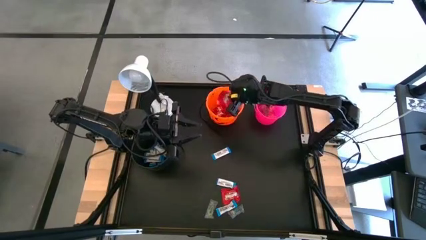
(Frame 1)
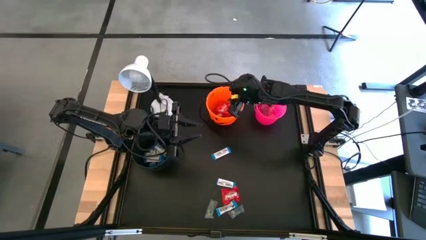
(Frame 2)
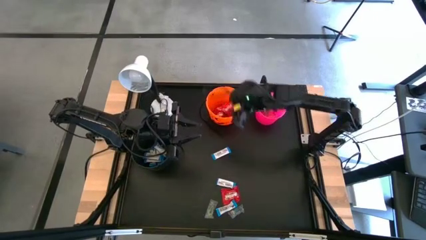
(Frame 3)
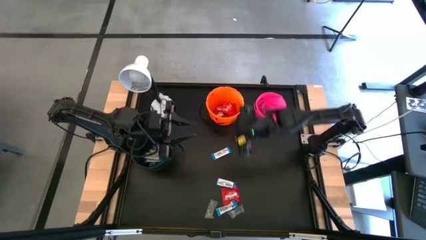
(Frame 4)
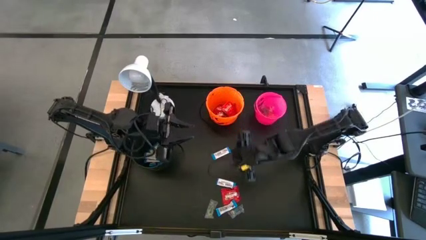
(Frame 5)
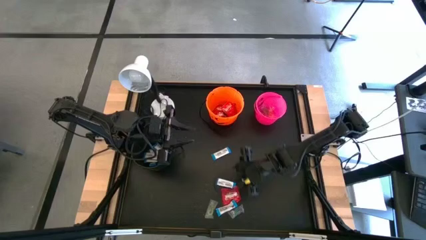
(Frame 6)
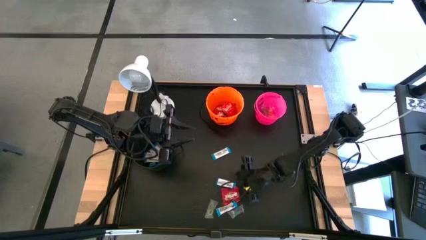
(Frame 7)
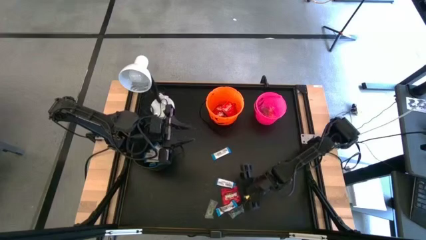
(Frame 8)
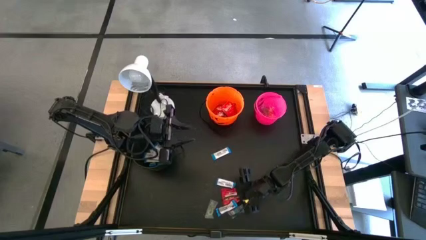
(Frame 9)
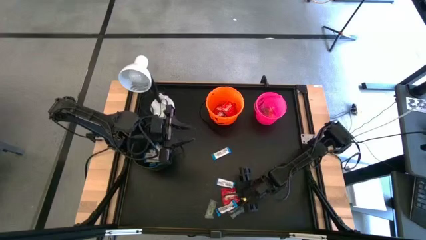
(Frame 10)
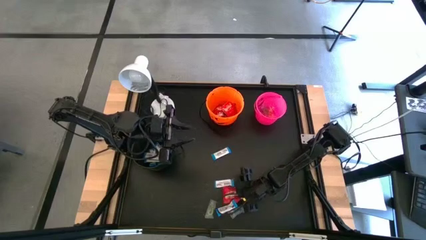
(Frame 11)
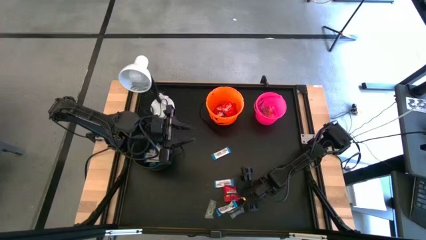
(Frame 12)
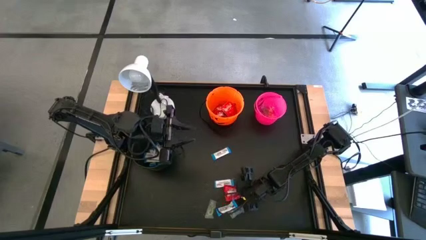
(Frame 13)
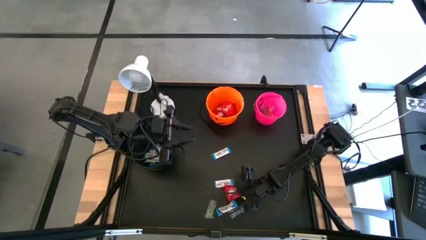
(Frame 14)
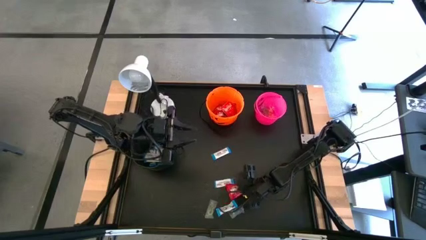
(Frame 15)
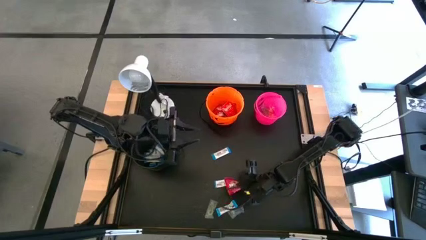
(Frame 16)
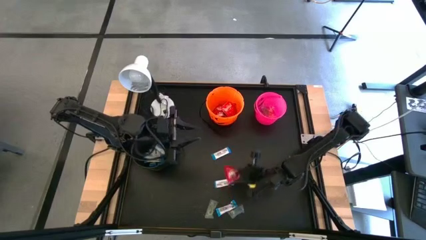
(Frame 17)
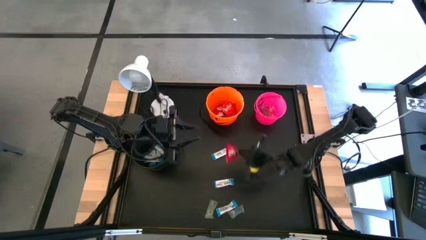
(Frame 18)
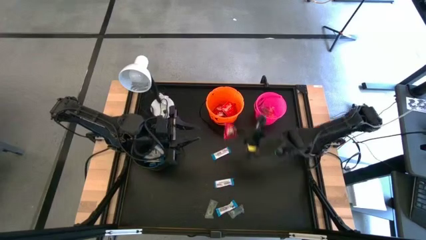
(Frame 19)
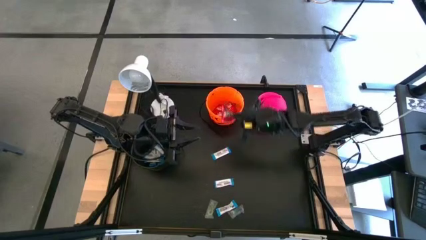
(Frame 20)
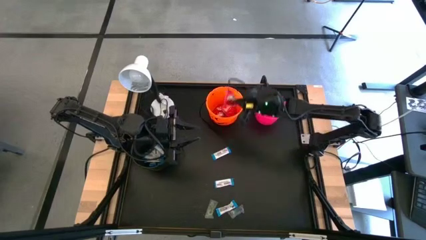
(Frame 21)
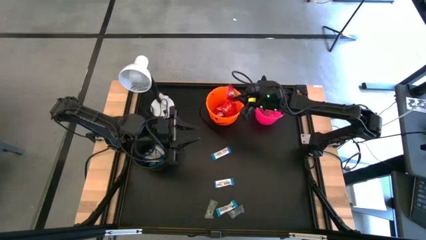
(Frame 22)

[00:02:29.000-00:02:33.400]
Task: Sort candy
Put the red candy into the orange bucket

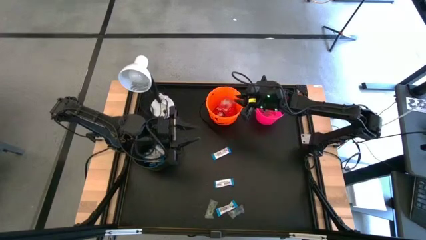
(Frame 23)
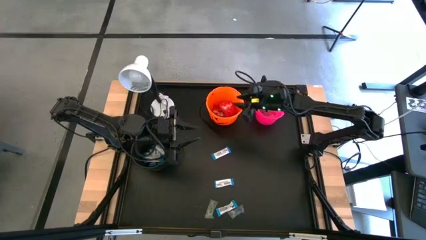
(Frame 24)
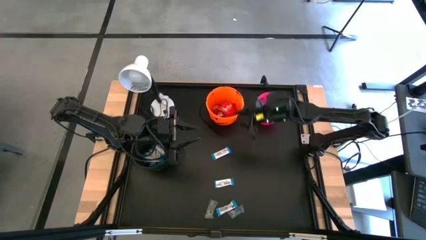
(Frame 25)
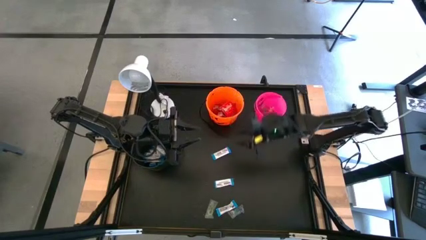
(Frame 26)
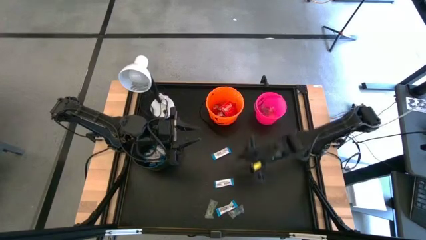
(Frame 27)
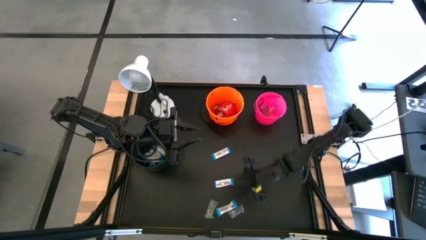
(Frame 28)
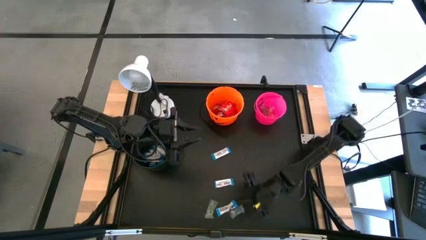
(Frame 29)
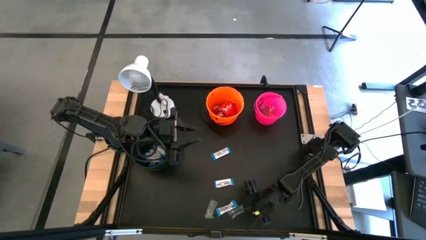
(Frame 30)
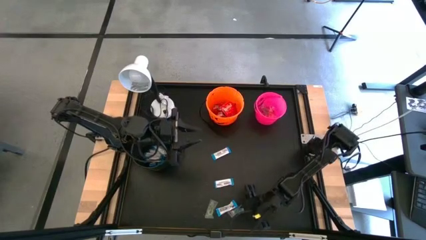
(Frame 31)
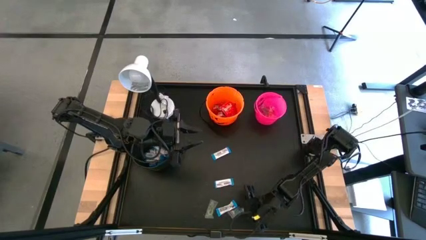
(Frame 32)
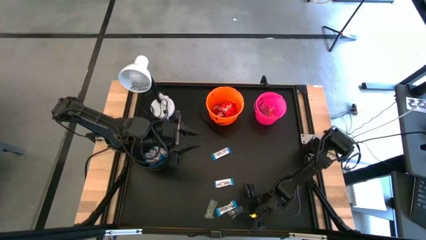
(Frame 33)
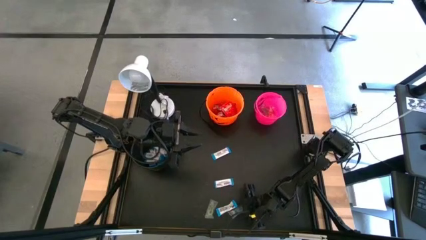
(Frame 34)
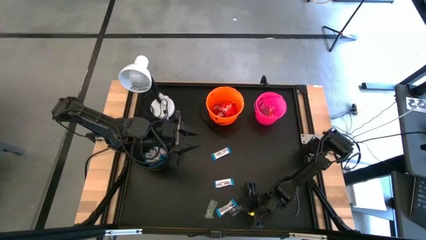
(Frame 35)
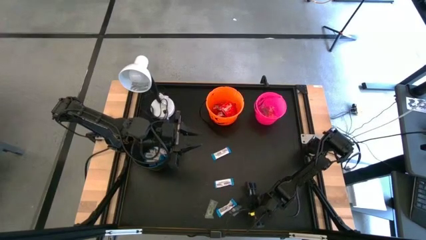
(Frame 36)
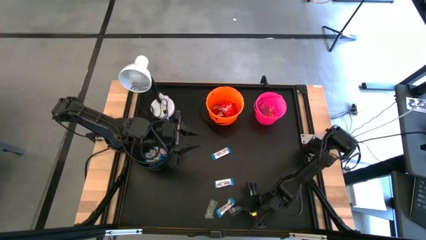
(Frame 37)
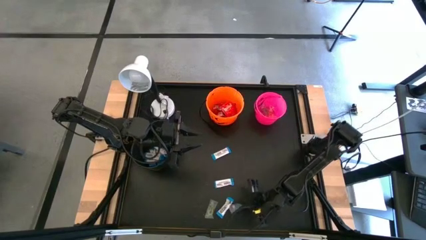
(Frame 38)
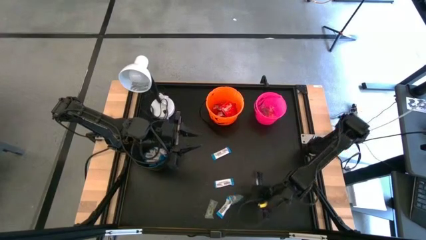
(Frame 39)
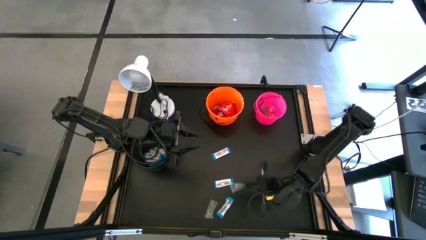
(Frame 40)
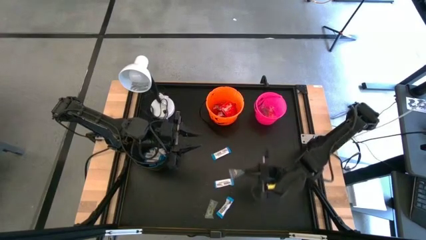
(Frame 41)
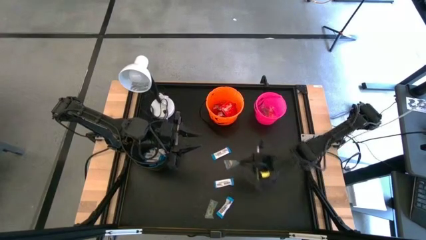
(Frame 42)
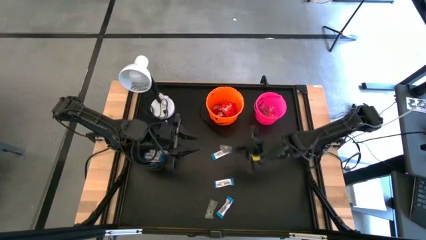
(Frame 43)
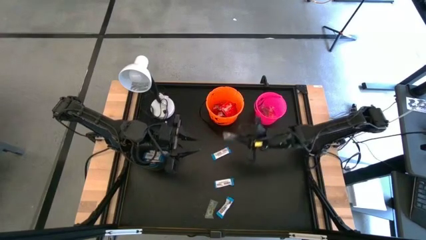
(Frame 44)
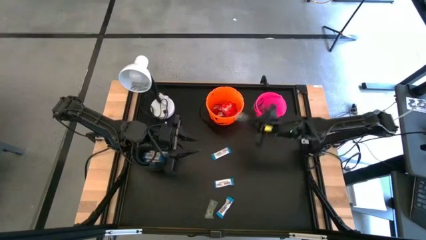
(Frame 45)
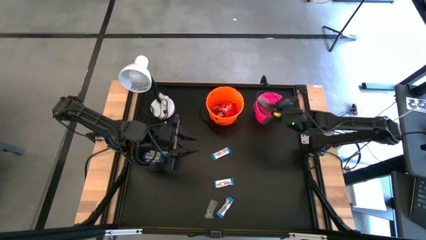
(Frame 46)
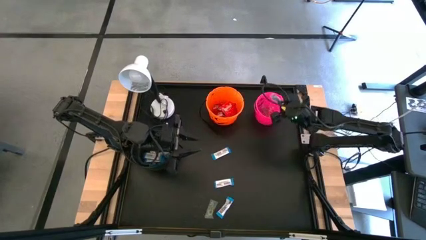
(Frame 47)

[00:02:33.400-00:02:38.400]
Put the blue candy into the pink bucket

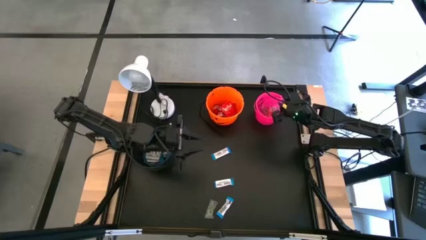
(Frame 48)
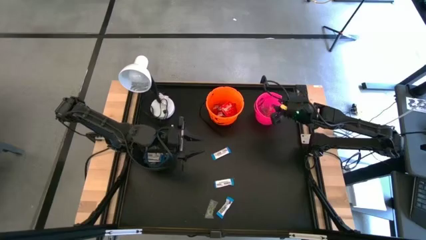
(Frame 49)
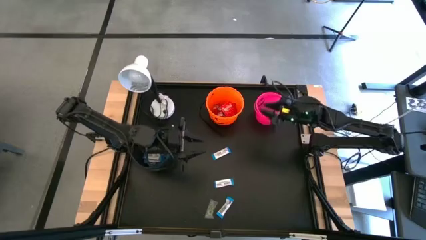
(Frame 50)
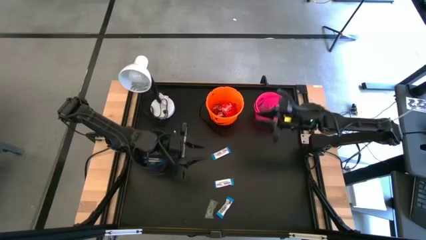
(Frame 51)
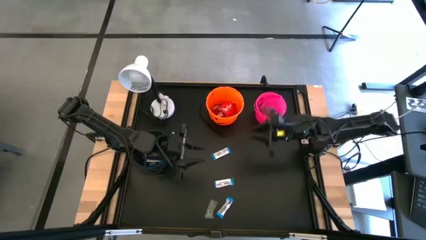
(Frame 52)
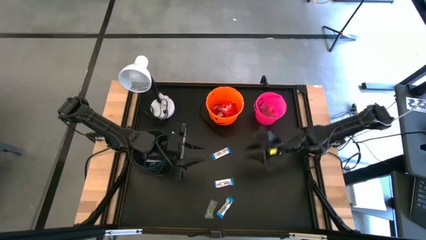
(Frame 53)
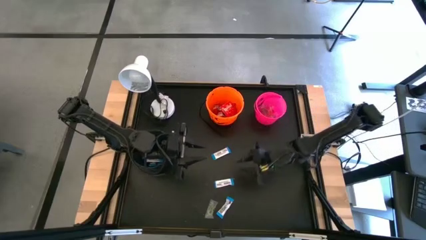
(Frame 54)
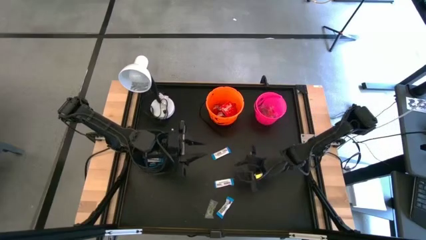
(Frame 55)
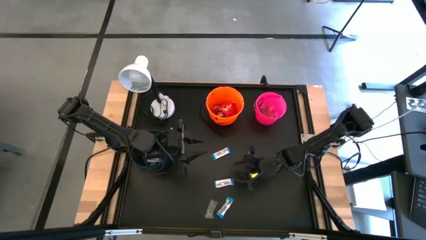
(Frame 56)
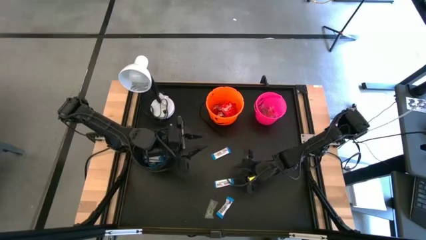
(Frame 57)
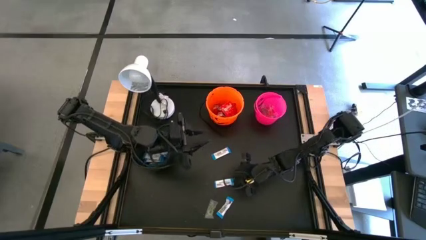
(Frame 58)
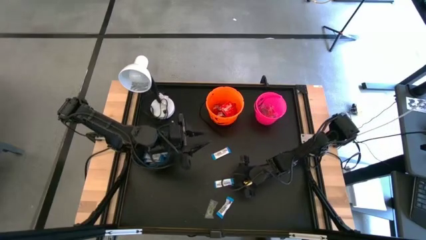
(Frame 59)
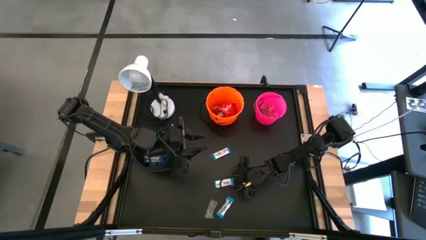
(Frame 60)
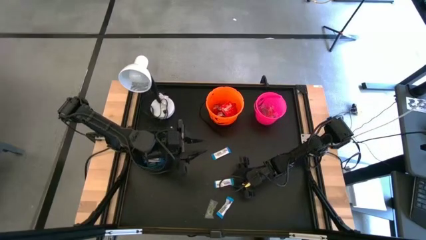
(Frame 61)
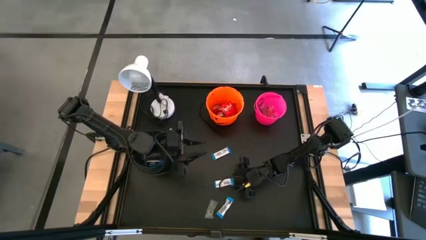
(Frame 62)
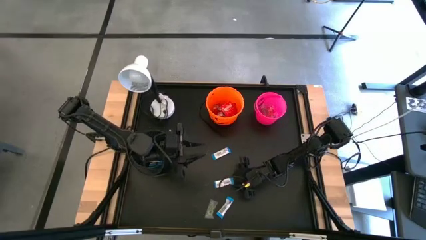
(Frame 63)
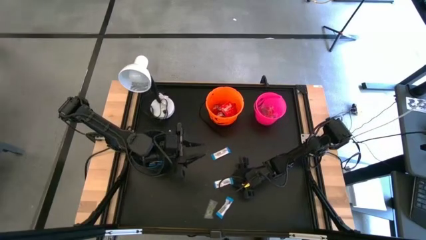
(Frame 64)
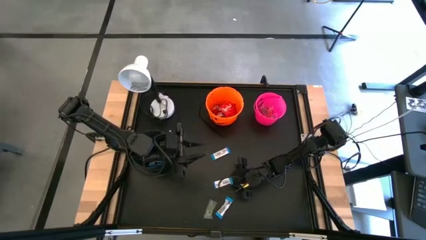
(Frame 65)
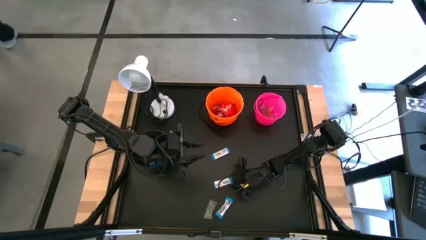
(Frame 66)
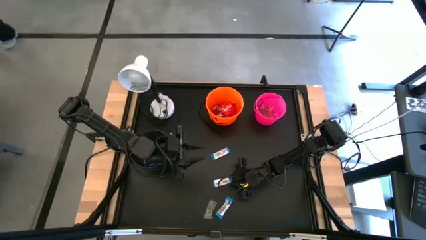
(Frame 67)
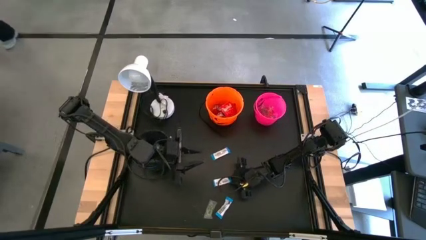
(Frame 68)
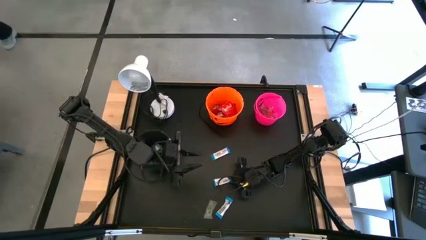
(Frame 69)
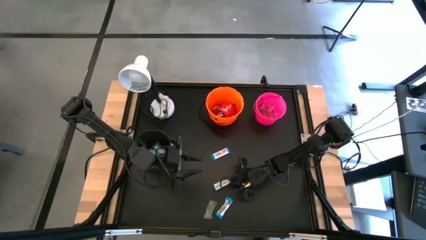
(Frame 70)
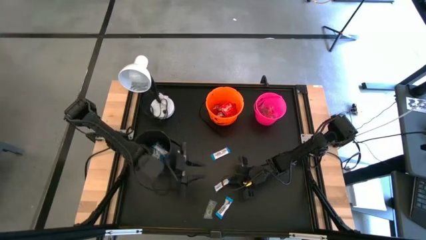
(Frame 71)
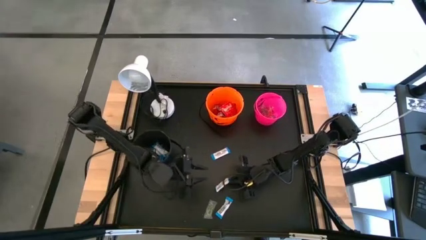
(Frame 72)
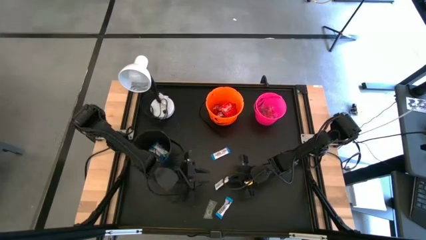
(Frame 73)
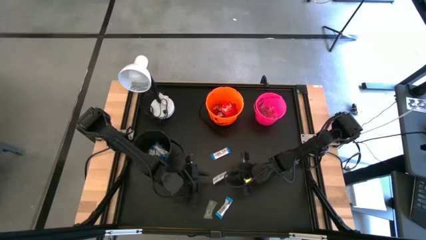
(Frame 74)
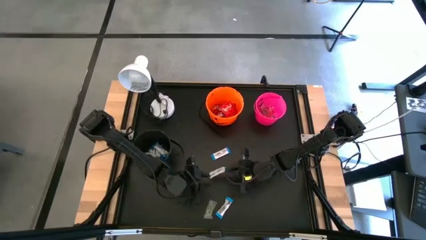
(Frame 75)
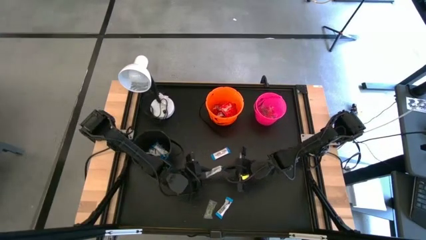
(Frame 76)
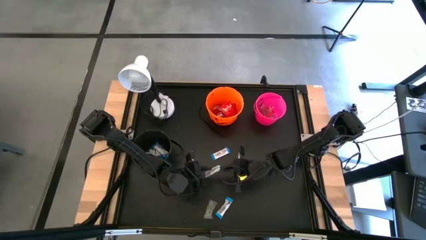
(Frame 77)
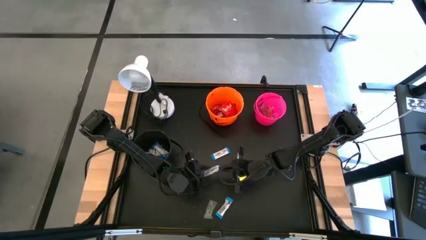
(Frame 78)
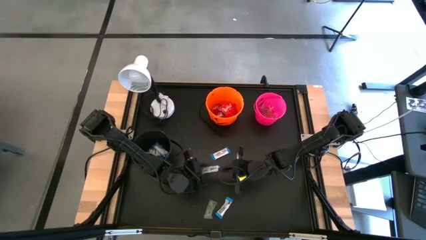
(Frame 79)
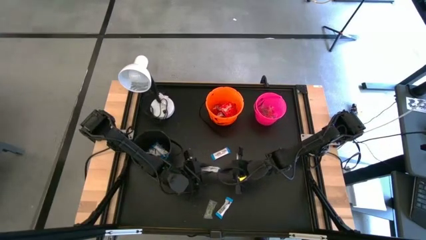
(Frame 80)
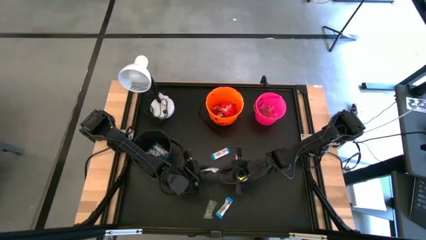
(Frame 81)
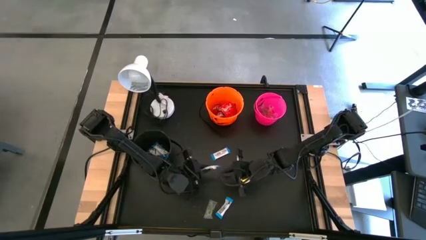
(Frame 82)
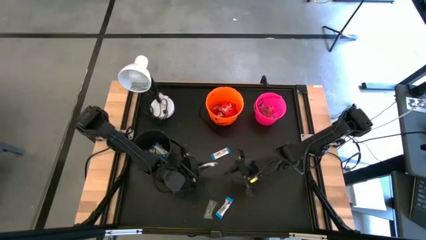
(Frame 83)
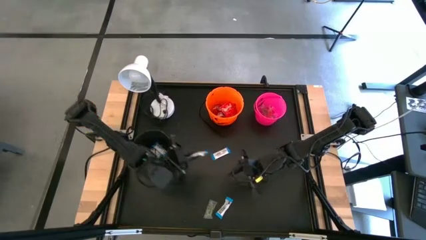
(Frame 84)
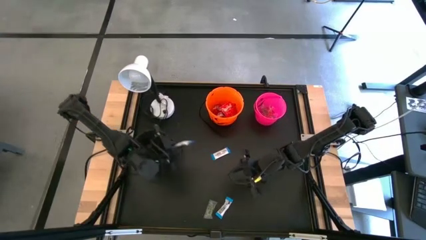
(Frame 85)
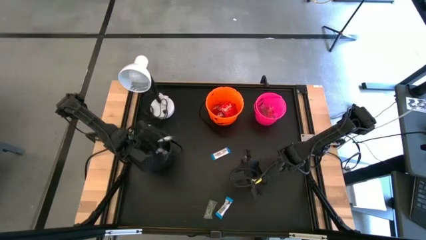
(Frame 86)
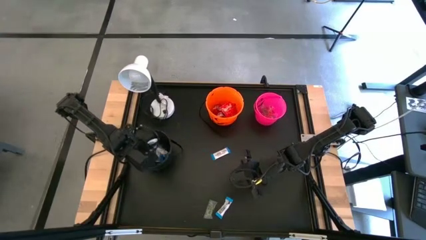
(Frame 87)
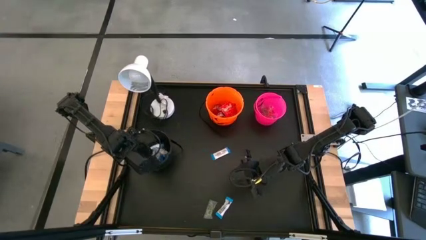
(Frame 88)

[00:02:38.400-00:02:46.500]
Put the white candy into the black bucket
